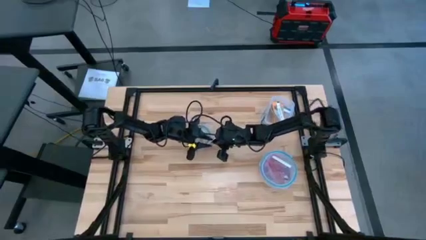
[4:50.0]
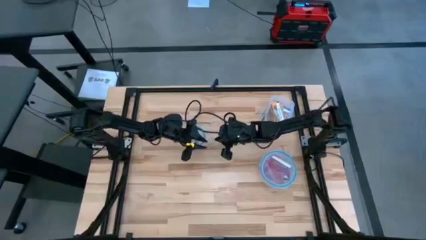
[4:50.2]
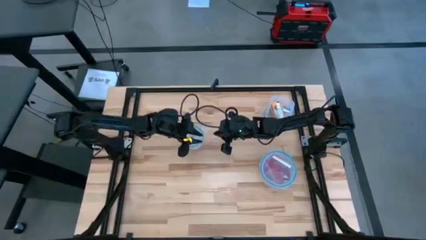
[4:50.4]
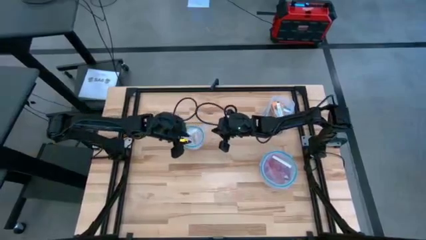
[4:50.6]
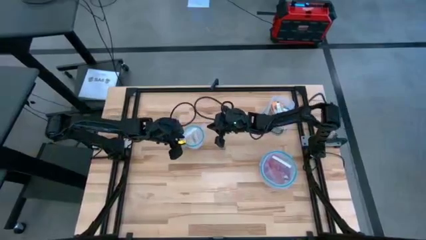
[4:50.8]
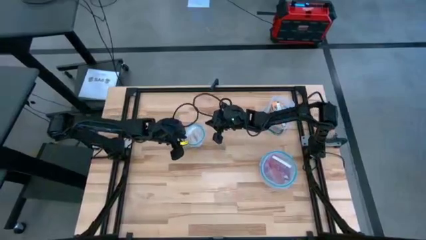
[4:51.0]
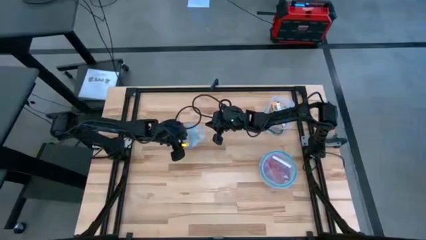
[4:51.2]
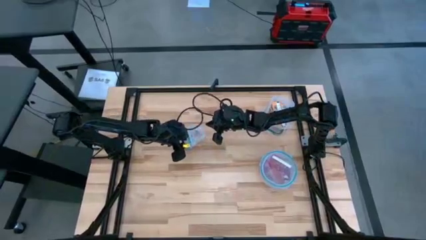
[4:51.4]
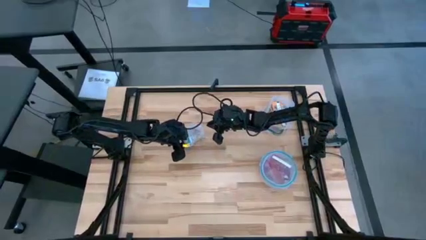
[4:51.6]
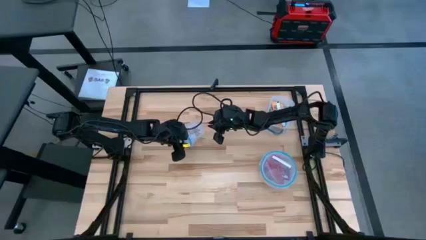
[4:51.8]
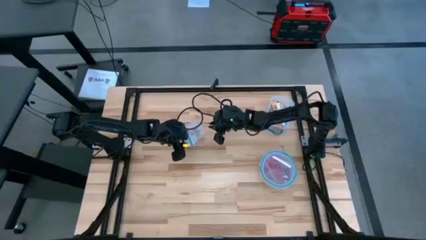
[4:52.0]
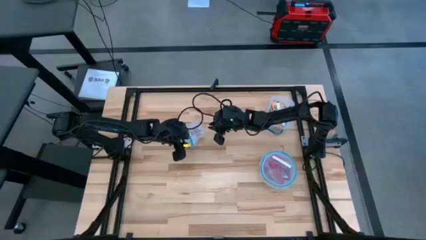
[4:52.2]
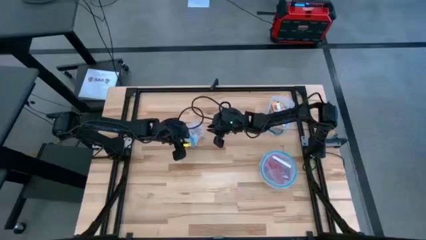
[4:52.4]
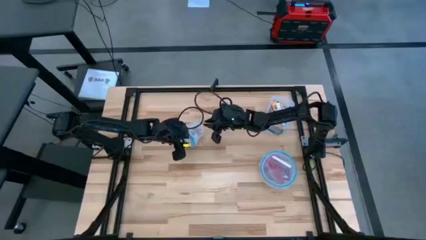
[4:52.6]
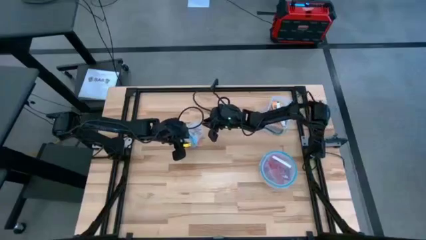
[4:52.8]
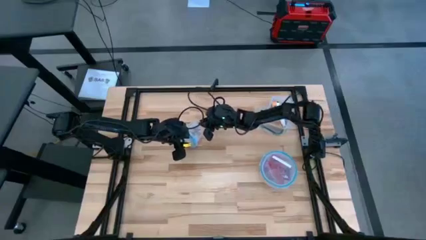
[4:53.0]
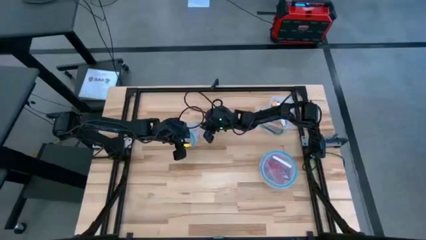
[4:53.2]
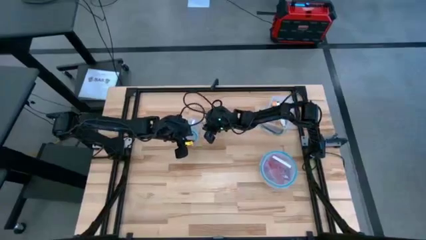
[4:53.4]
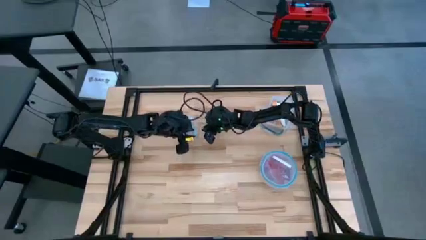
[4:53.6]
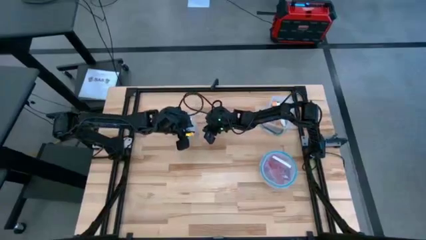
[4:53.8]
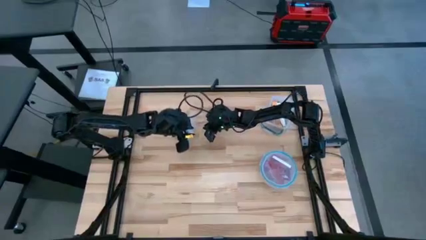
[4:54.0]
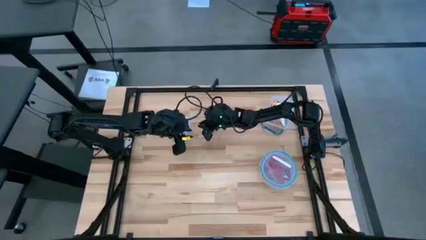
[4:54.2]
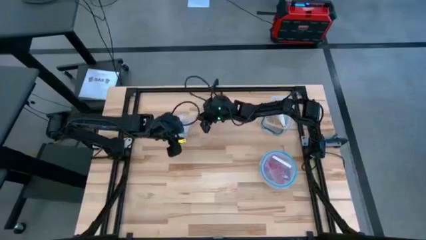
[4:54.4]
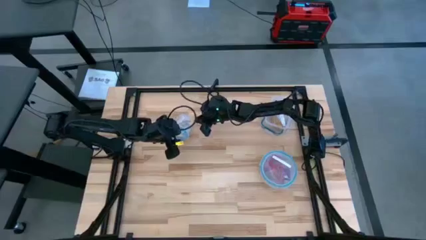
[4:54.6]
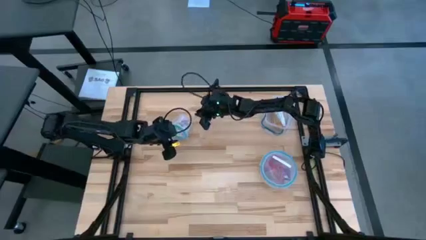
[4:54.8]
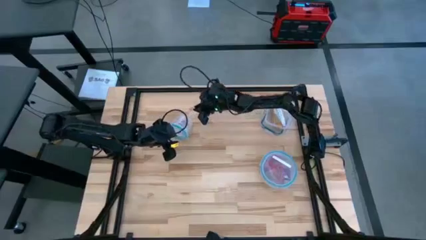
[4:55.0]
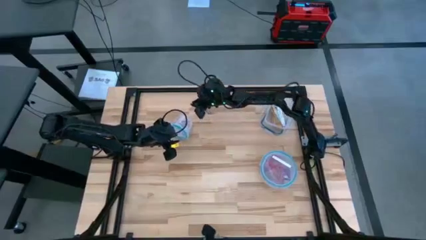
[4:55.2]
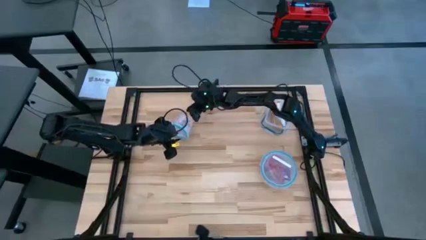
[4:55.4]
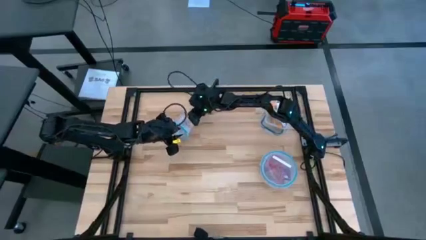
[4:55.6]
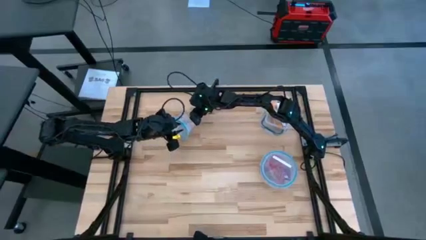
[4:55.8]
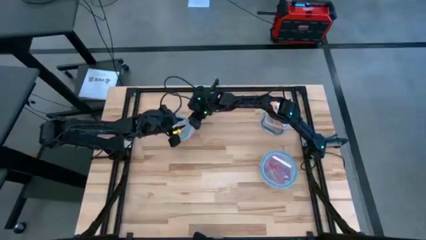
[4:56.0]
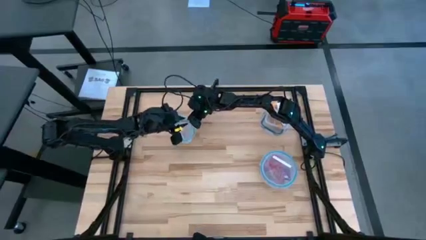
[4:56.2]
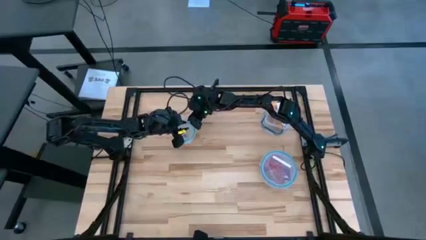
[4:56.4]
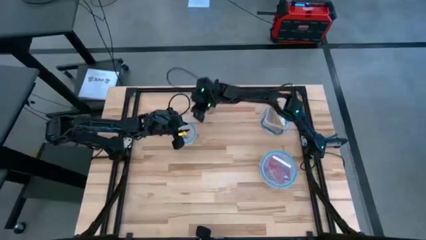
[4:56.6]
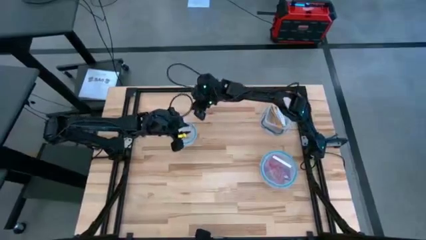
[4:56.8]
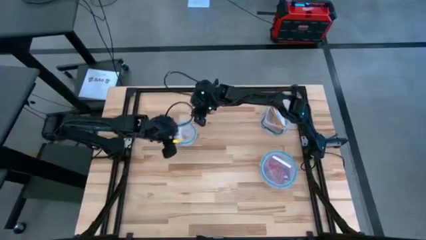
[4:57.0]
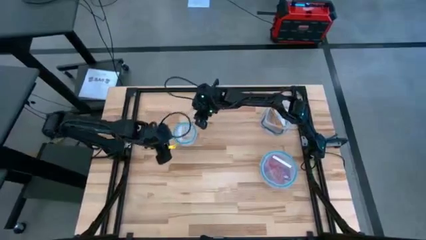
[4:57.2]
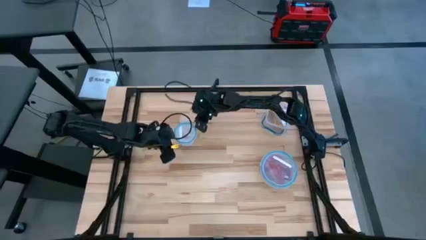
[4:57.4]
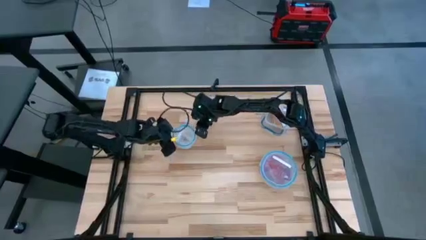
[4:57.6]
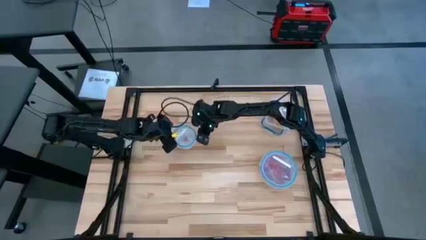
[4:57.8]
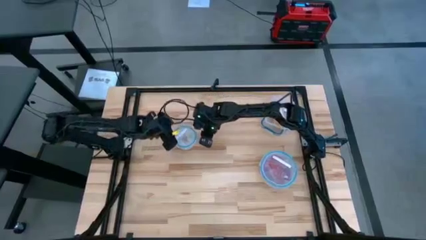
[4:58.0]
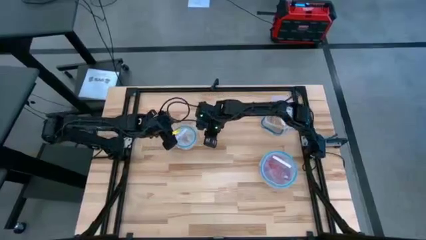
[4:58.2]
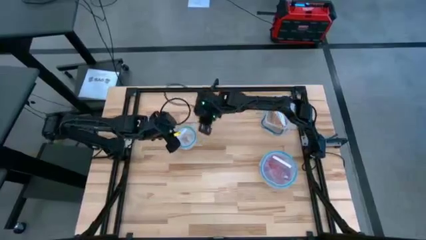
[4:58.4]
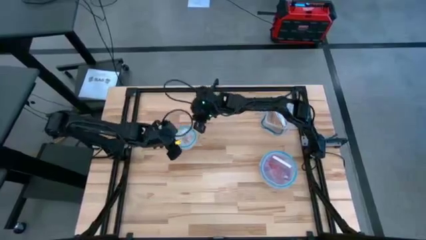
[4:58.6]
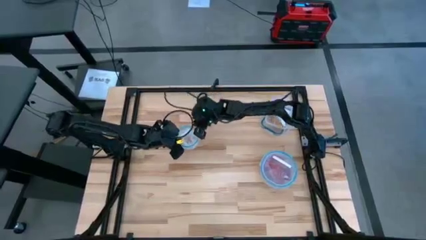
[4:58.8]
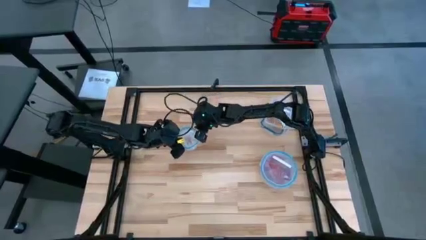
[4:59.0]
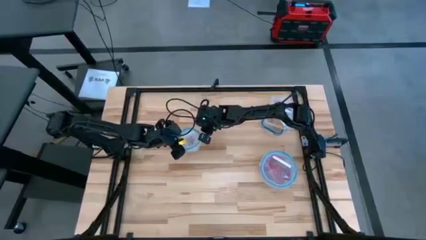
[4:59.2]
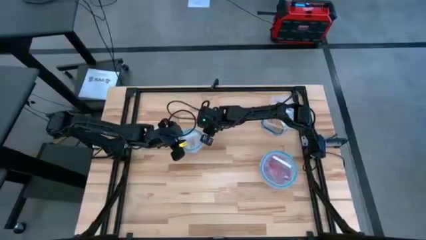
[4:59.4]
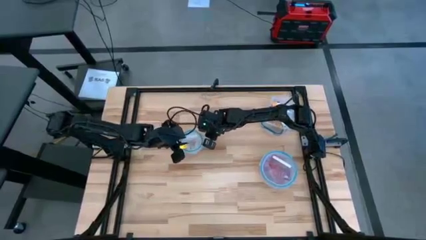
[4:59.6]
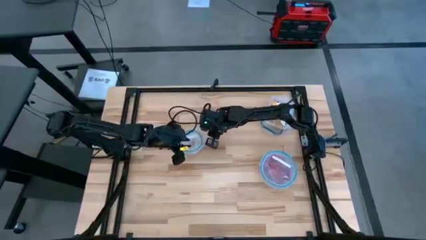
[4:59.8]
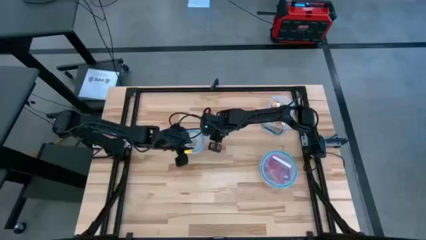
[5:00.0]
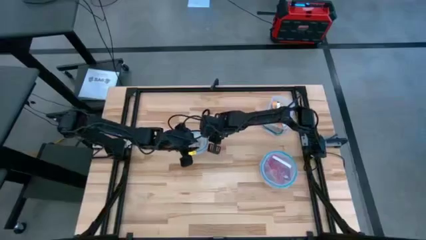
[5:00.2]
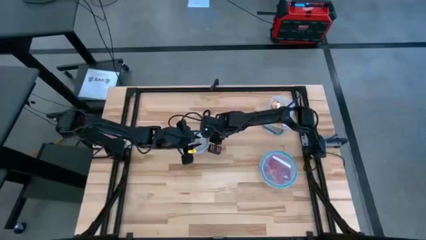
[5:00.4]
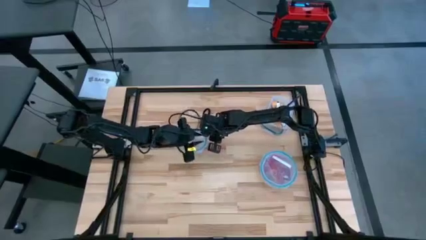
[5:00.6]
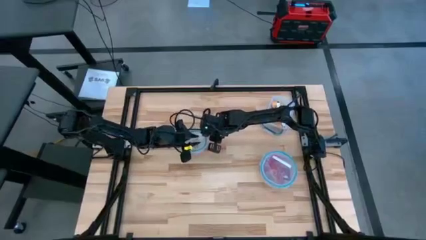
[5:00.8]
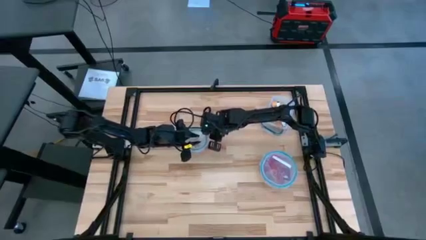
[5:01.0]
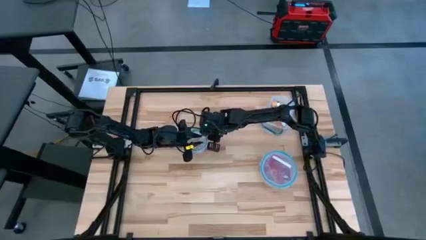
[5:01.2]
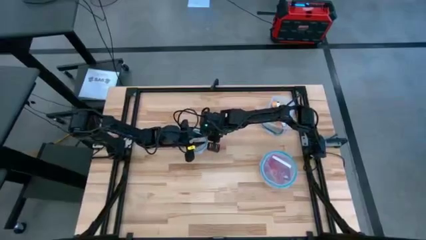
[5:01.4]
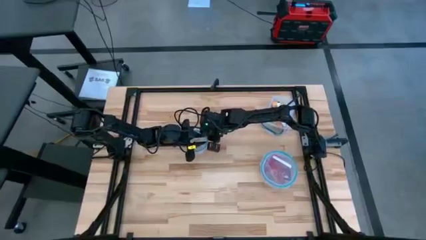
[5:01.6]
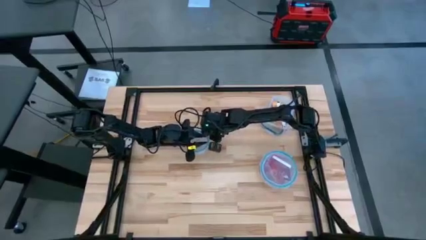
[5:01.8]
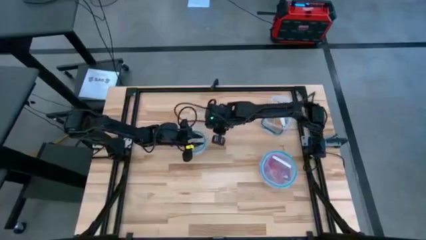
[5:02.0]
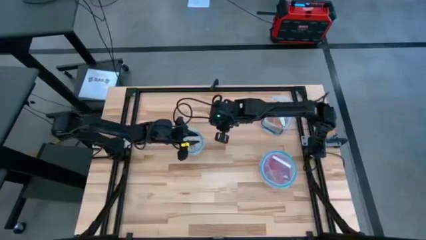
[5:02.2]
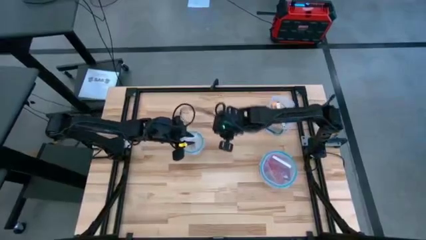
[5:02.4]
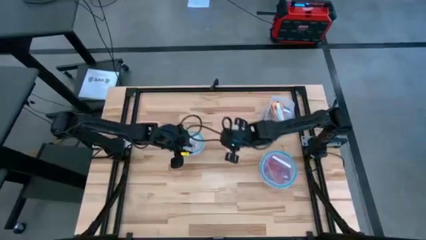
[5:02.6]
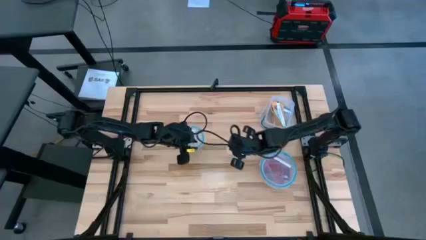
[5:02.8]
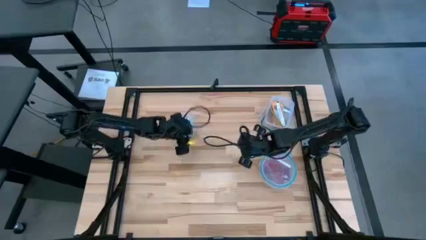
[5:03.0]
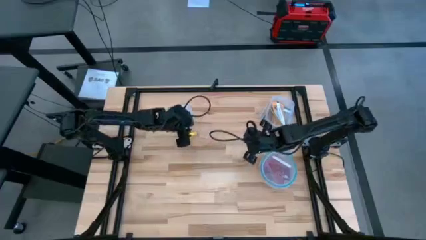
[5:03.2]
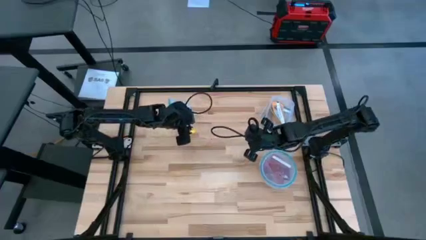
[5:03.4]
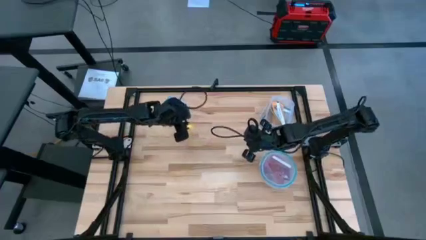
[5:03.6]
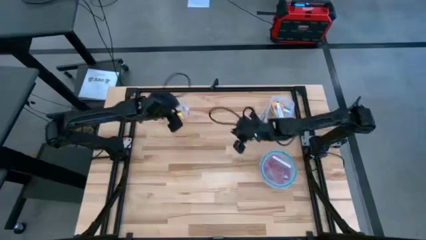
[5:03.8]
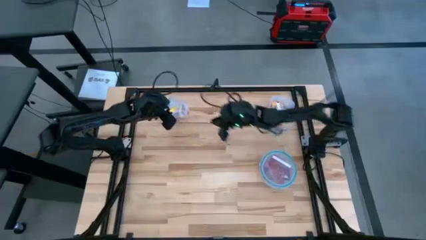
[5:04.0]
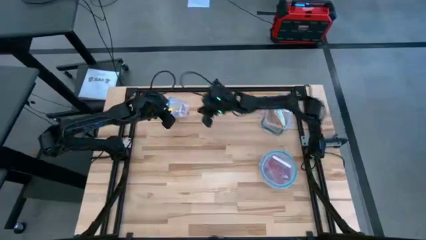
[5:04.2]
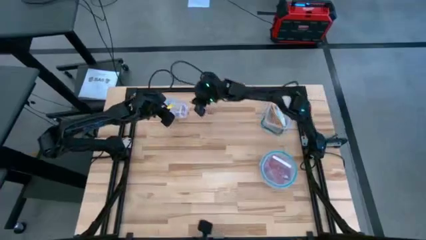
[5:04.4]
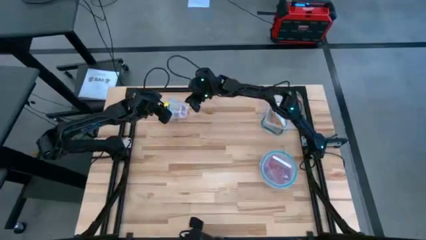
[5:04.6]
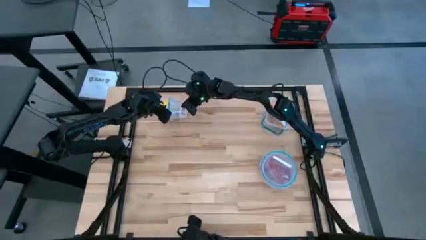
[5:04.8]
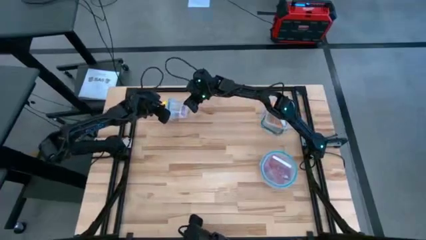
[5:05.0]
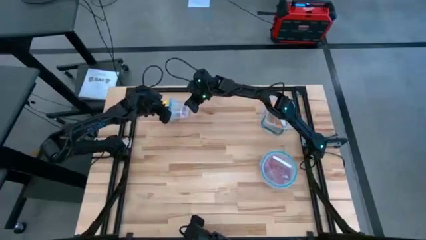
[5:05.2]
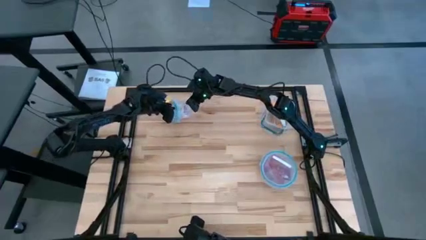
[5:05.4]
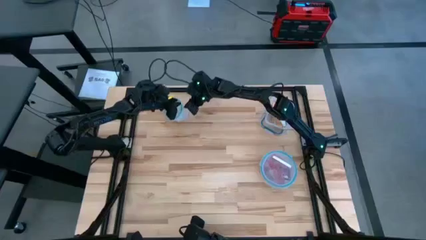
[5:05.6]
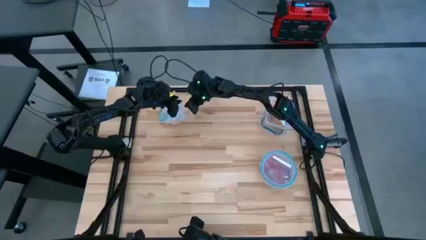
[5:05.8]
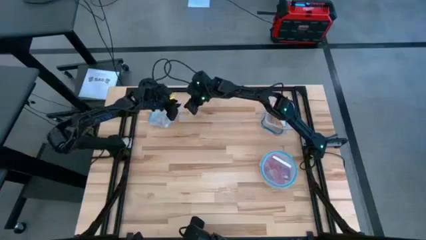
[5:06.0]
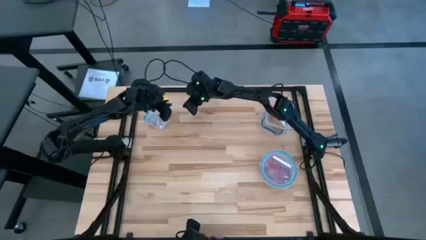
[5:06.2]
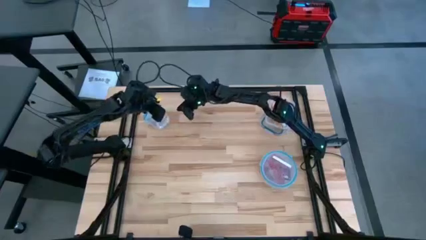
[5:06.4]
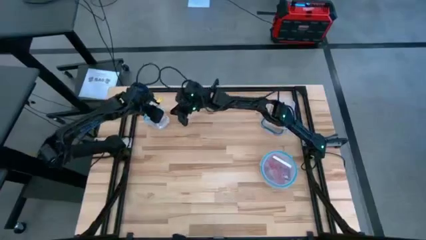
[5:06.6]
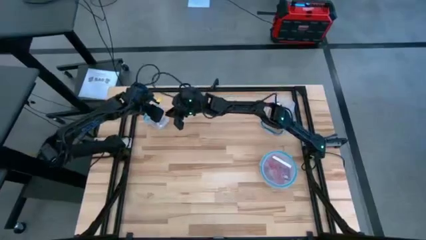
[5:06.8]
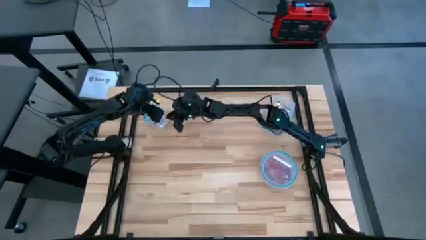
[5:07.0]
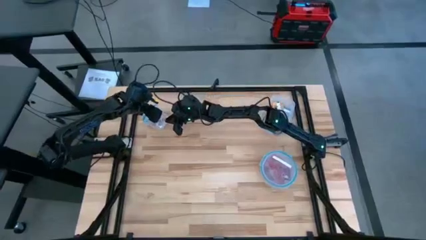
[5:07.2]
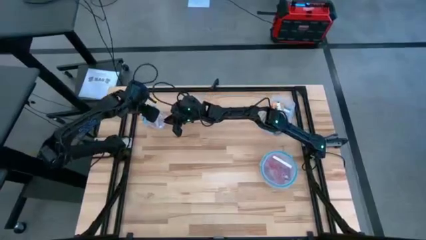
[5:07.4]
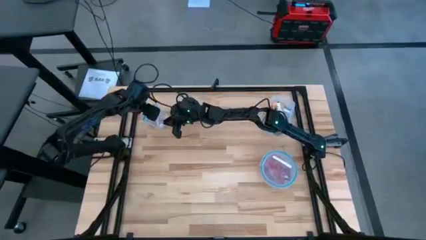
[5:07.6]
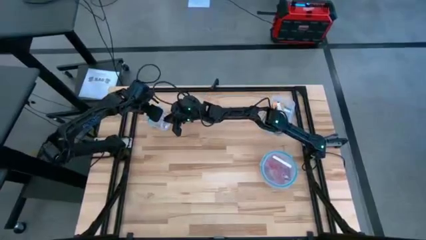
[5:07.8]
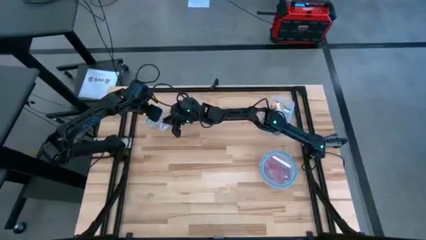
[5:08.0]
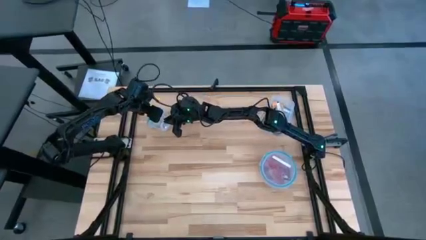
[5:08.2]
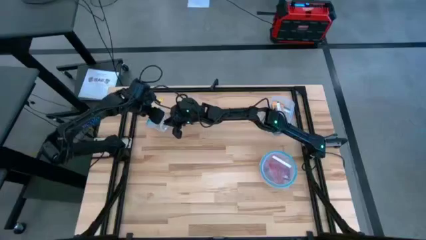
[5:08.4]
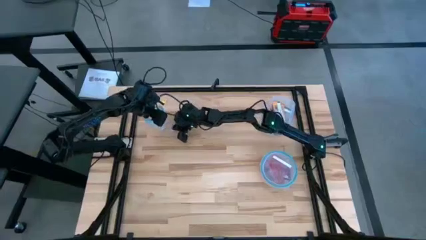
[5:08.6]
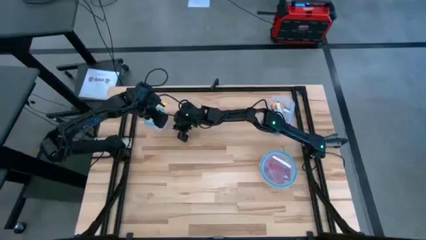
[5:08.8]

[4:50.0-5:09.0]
Task: Sort candy
Close the small round transparent bin
